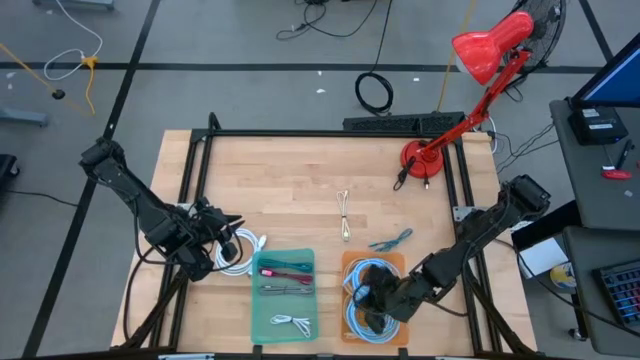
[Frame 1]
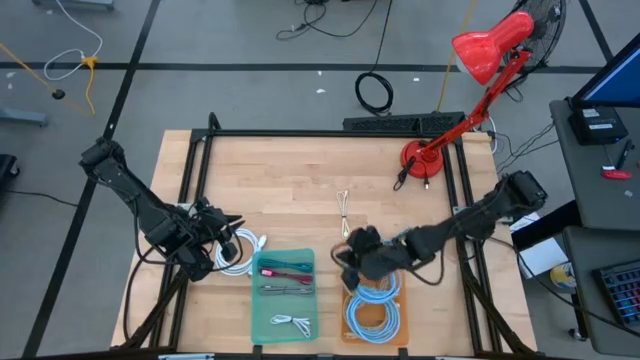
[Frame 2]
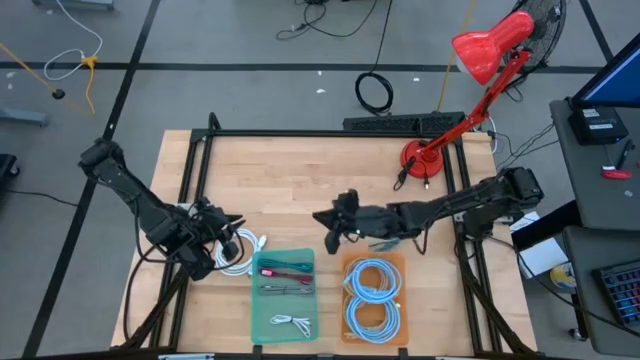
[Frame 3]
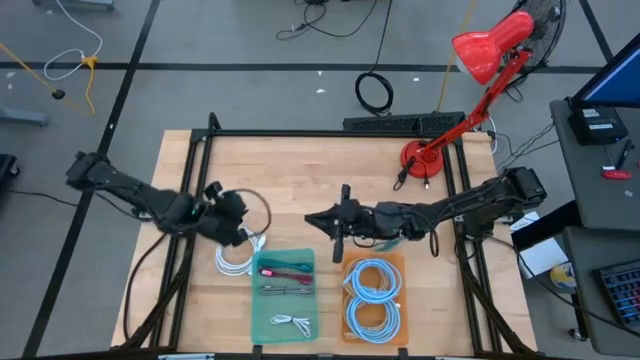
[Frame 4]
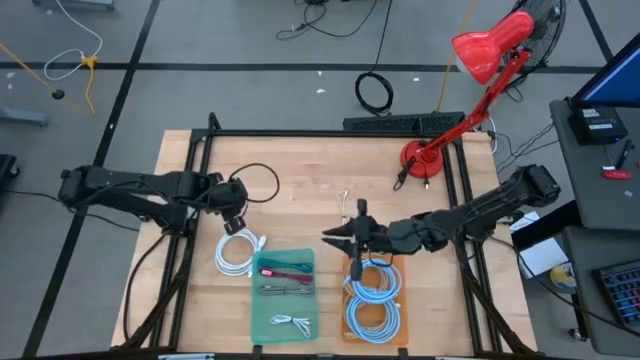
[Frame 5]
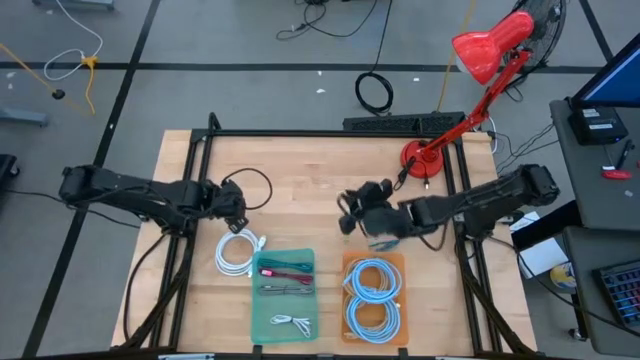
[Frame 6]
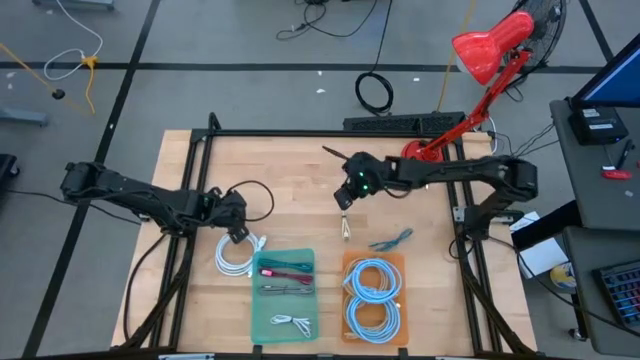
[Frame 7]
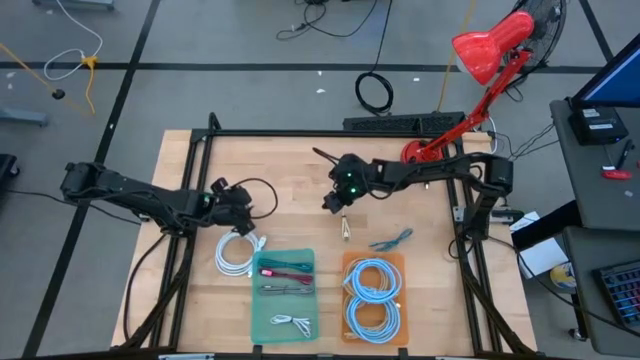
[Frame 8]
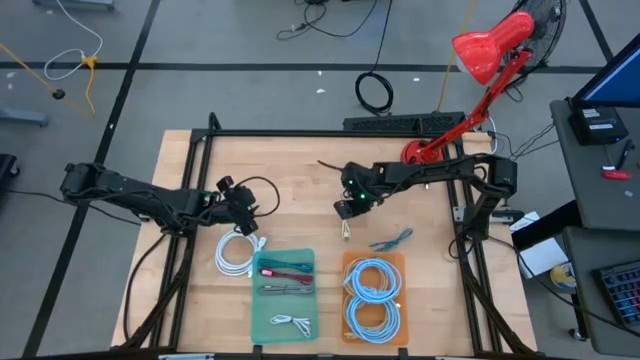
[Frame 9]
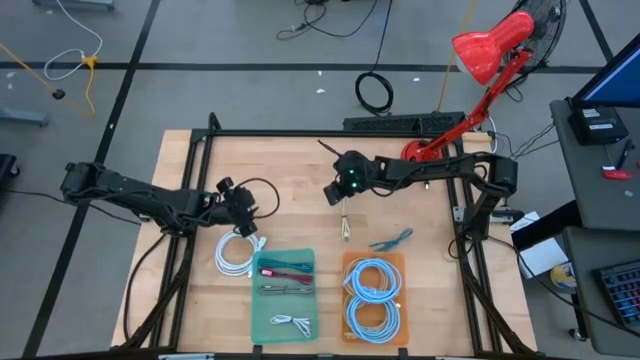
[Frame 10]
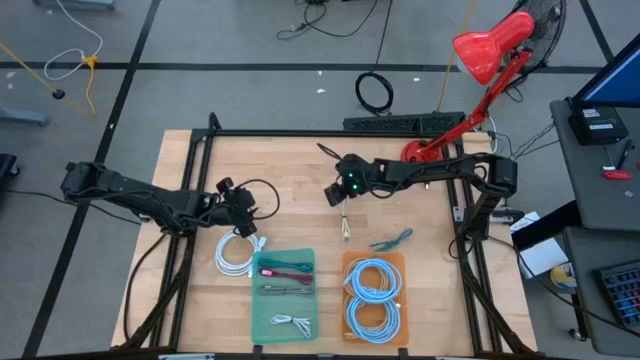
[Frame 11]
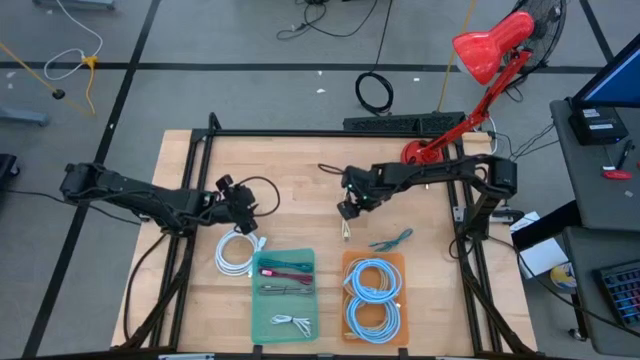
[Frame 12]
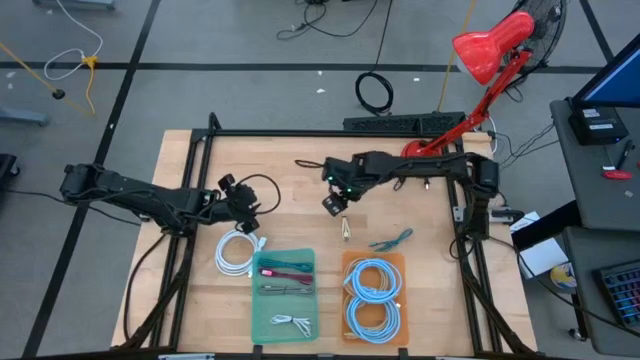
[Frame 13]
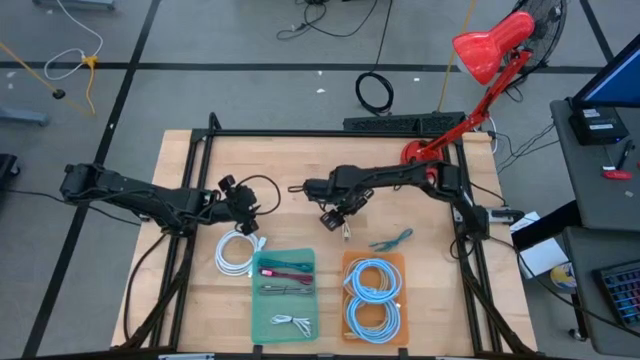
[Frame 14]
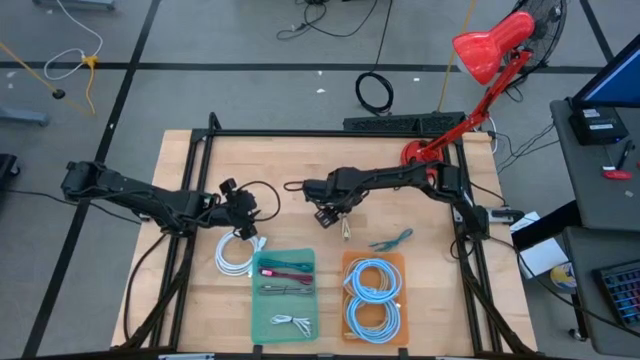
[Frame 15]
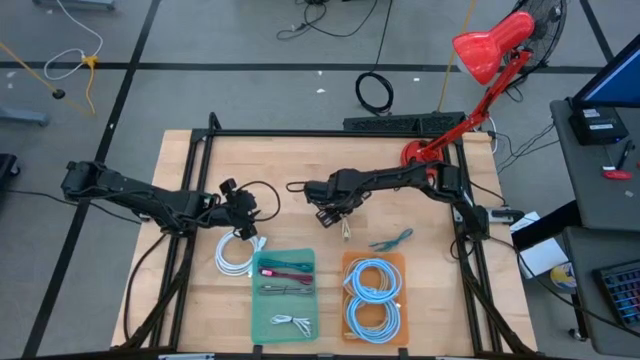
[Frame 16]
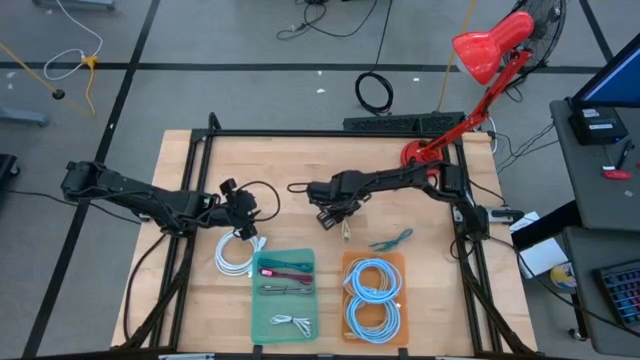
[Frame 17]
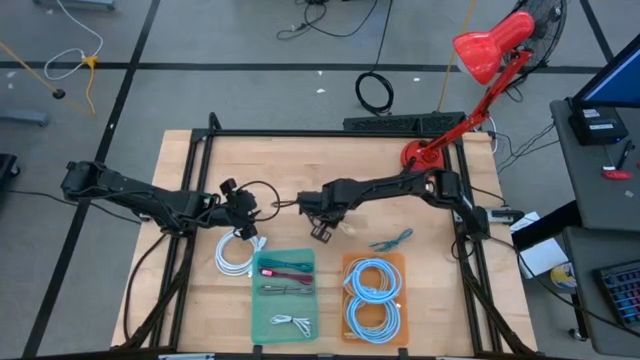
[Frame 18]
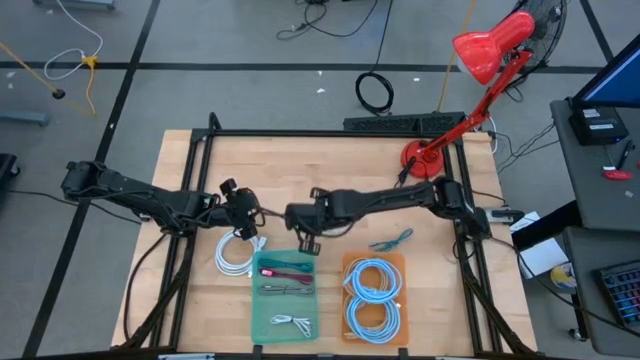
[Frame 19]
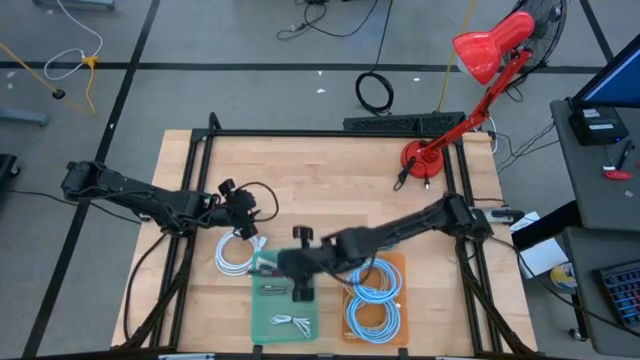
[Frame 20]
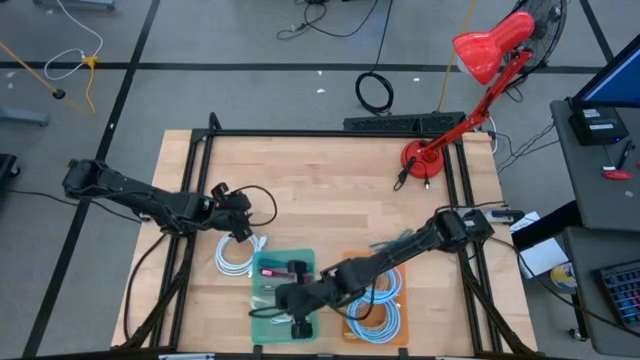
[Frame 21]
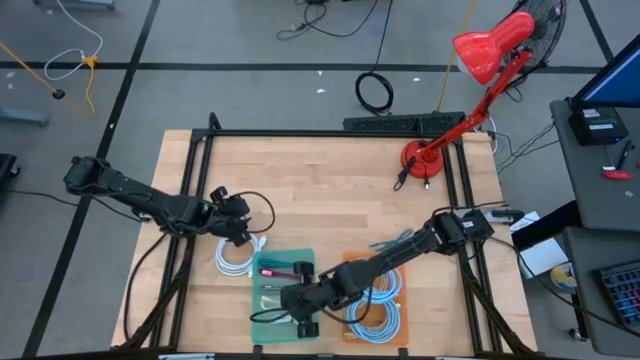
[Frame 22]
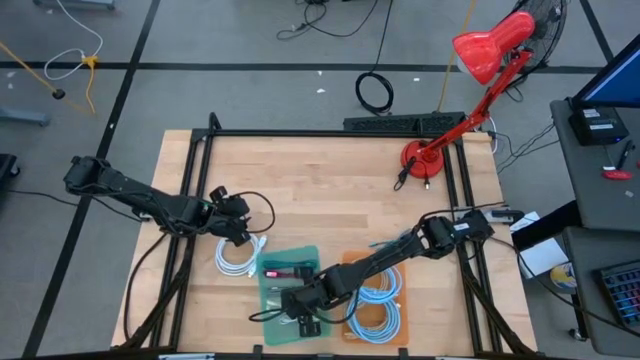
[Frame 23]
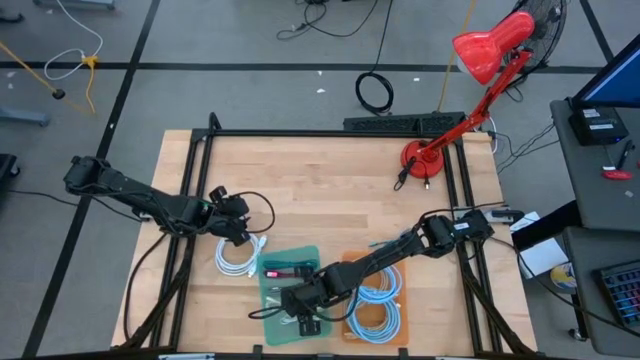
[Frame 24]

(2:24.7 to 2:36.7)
Task: Pick & Place USB Port
Put the gray charger cable into the green bin

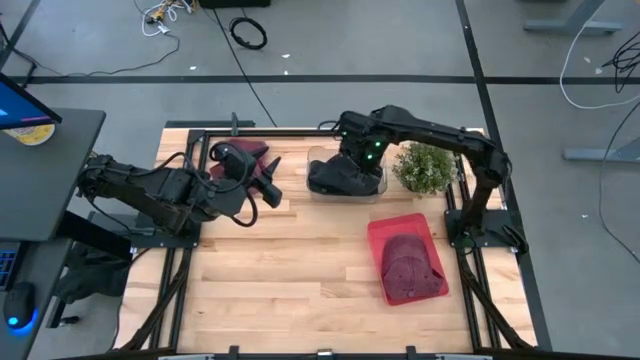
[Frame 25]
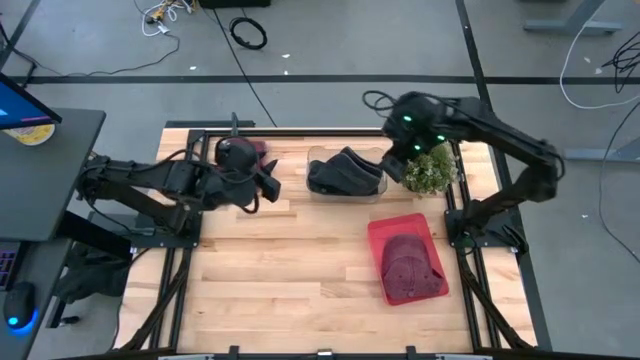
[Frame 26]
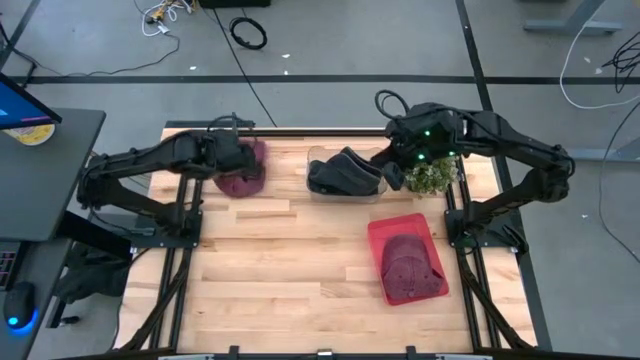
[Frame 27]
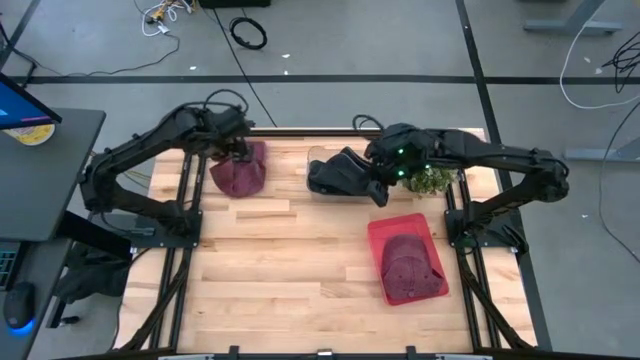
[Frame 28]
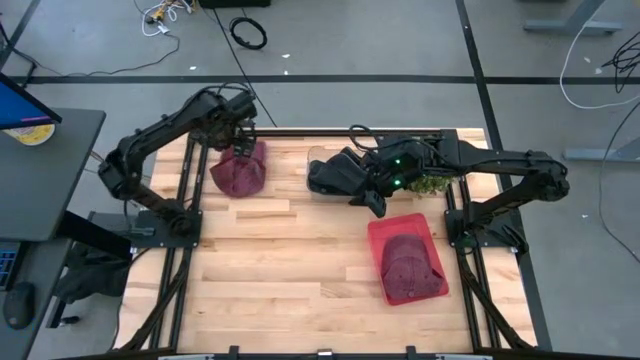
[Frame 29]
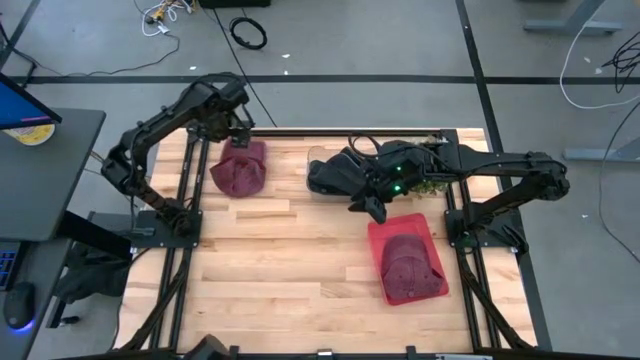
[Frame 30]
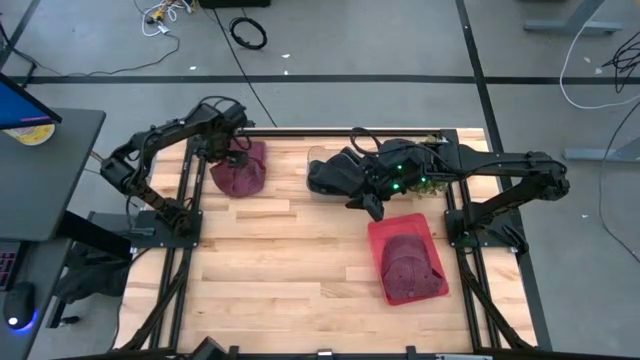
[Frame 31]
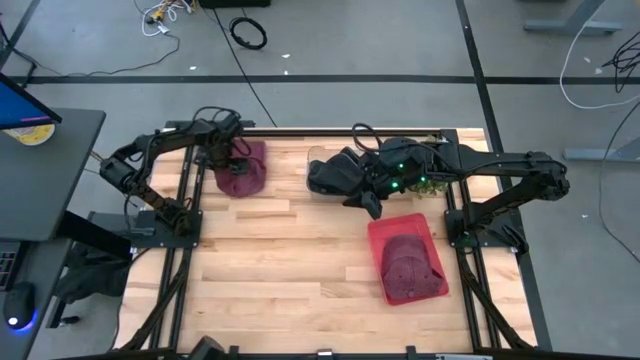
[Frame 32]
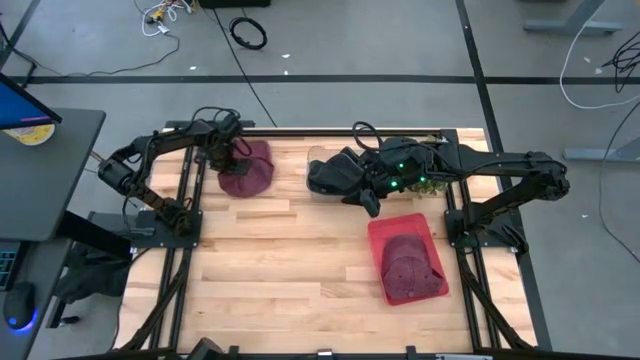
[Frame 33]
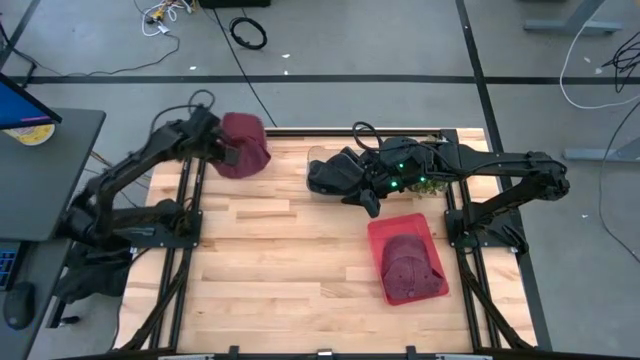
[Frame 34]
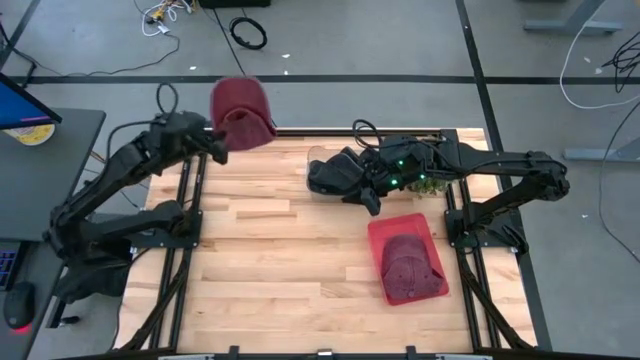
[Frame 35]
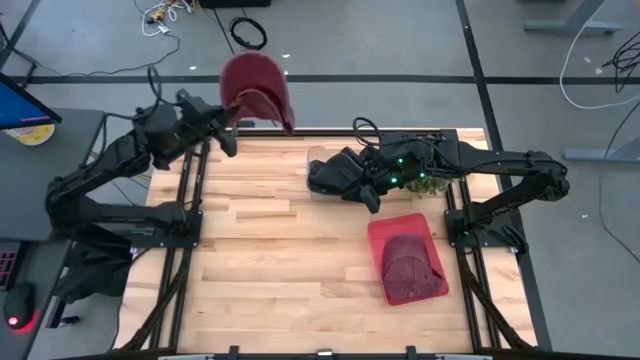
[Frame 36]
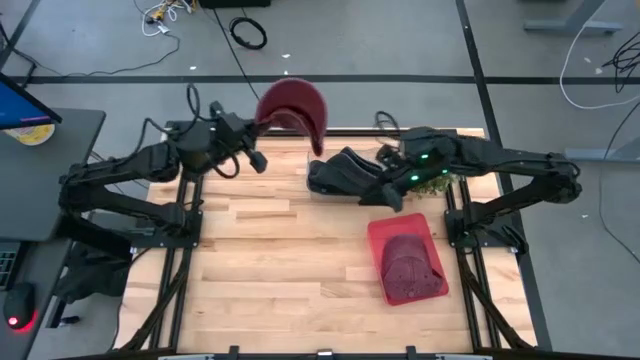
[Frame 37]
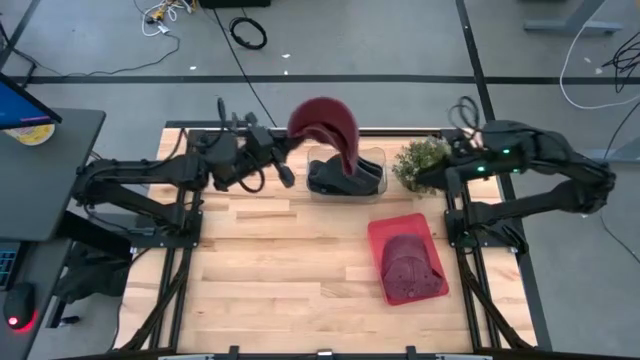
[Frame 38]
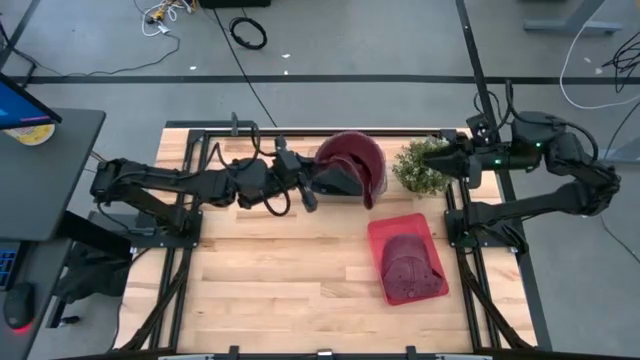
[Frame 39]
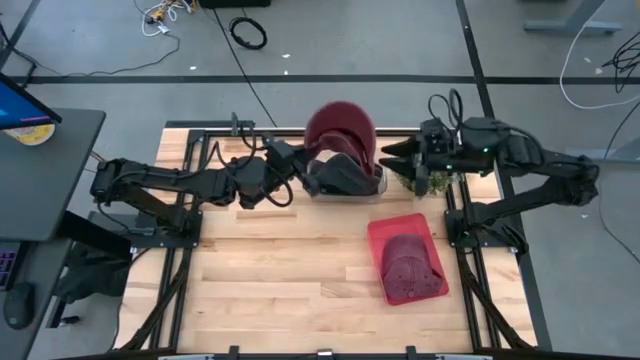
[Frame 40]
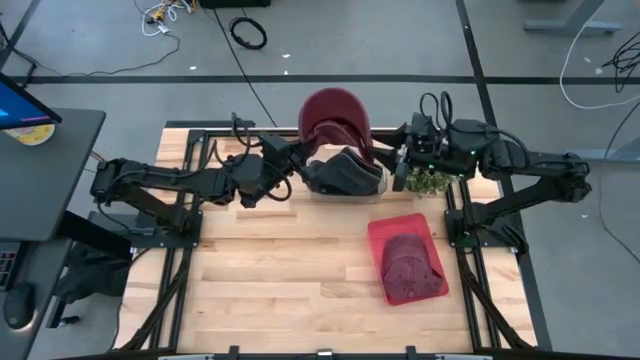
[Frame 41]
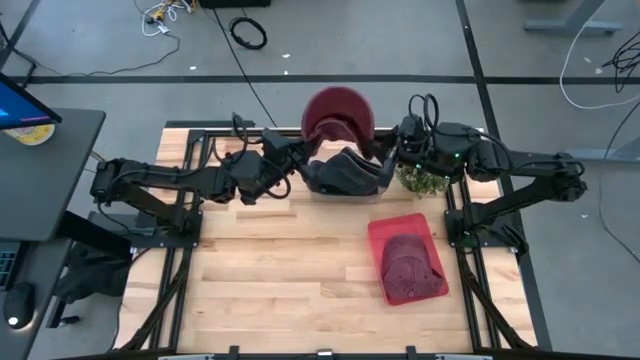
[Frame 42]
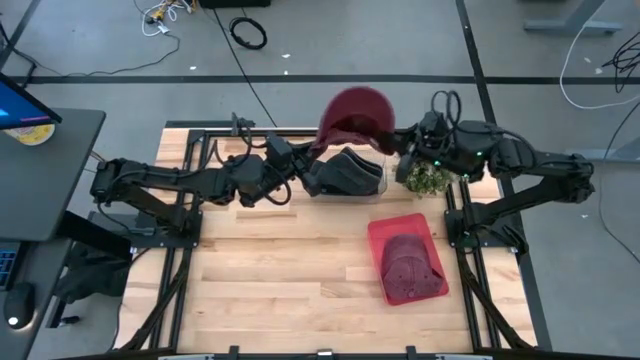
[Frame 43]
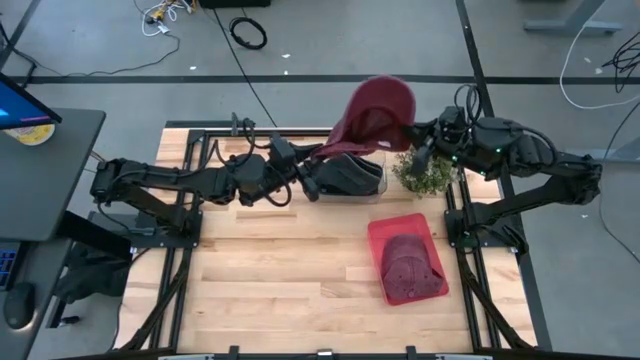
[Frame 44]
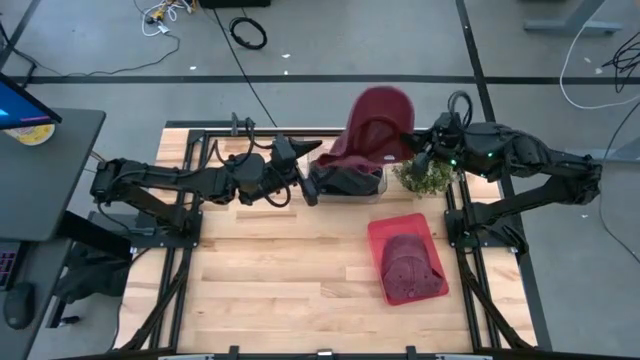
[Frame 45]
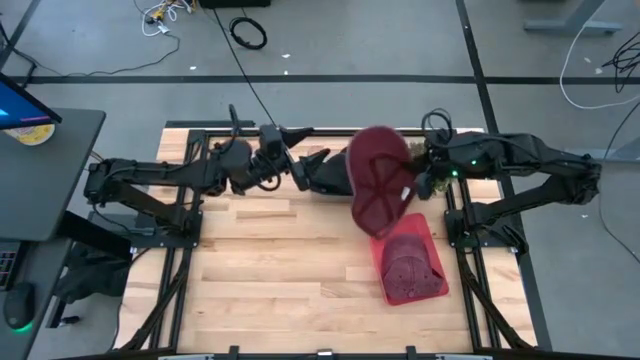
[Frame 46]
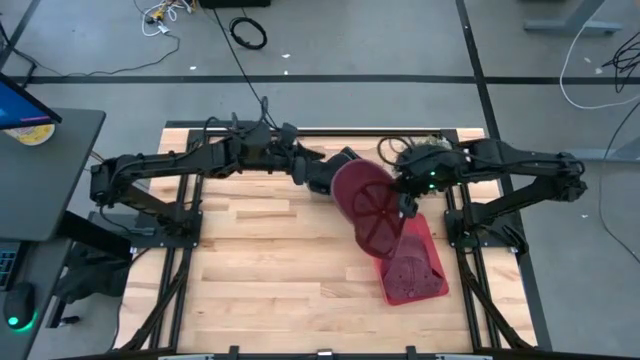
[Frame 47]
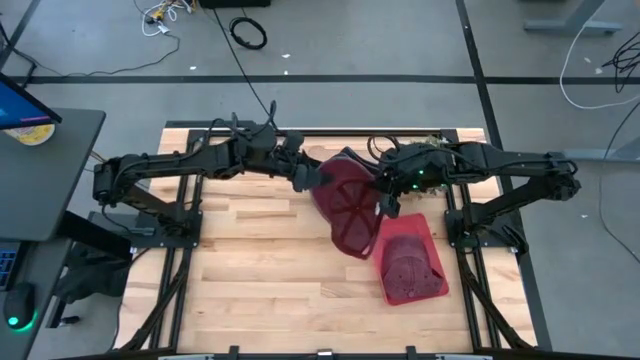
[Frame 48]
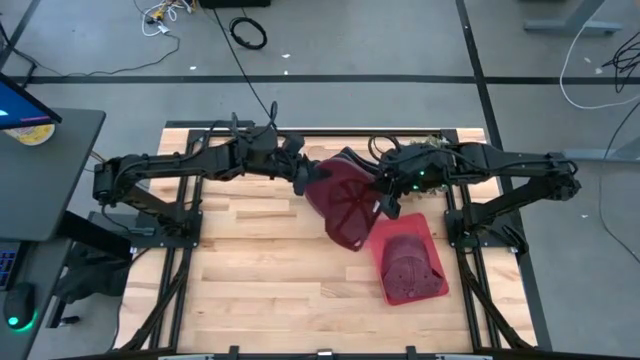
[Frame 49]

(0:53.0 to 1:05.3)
Task: Pick & Place hat
Put the red cap into the red bin
